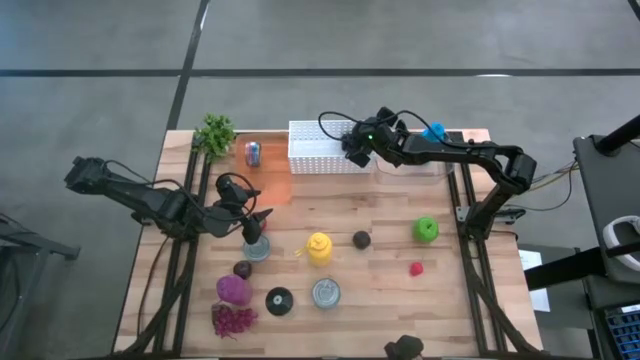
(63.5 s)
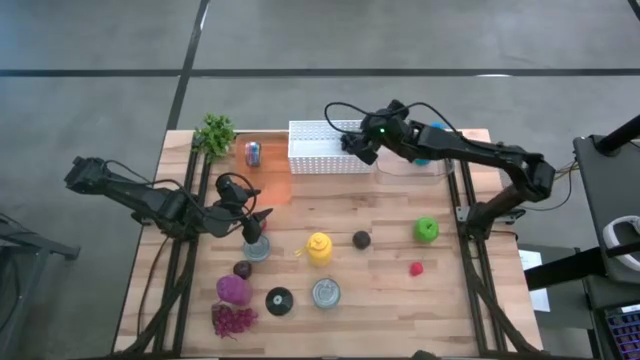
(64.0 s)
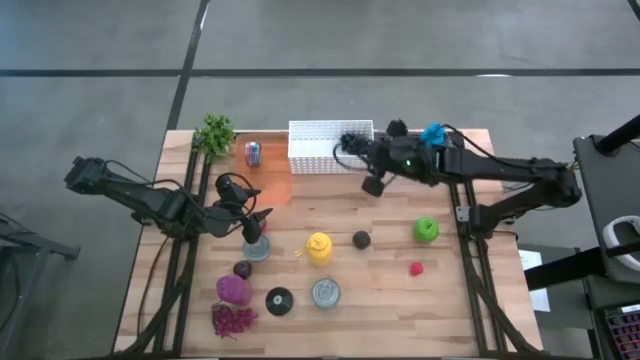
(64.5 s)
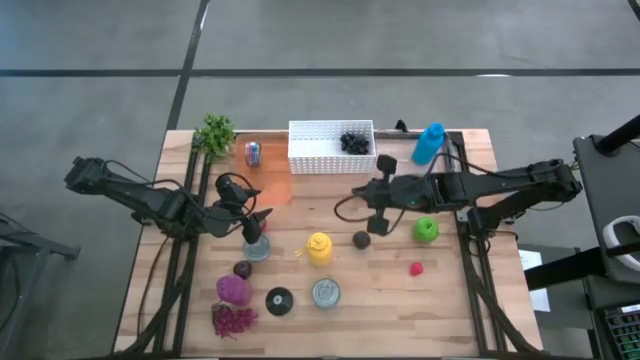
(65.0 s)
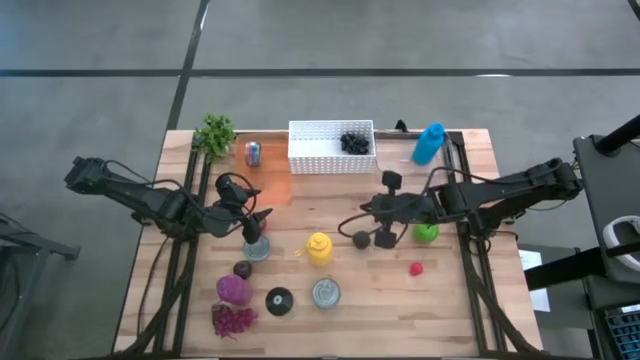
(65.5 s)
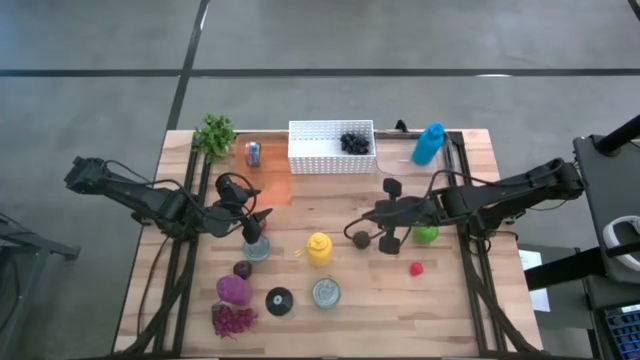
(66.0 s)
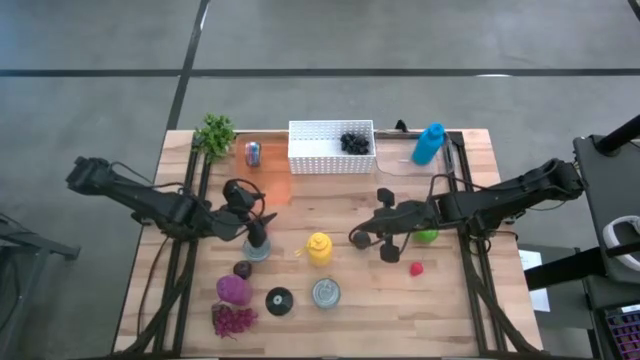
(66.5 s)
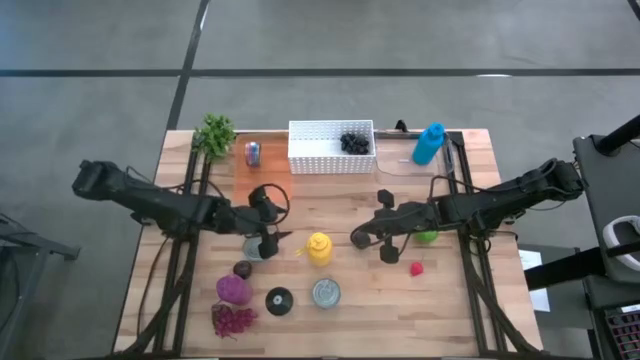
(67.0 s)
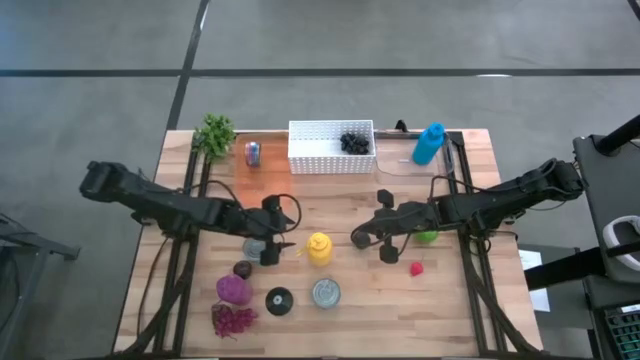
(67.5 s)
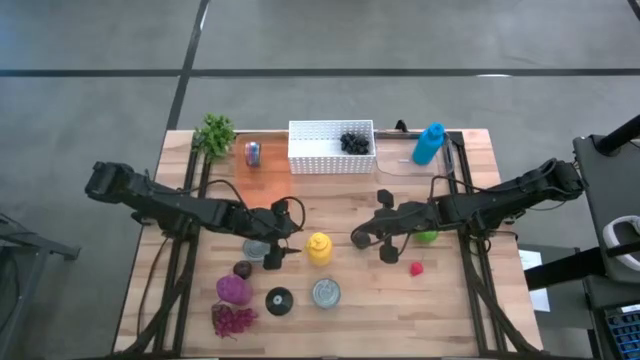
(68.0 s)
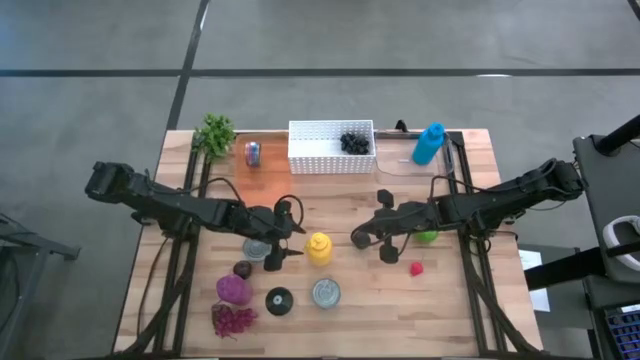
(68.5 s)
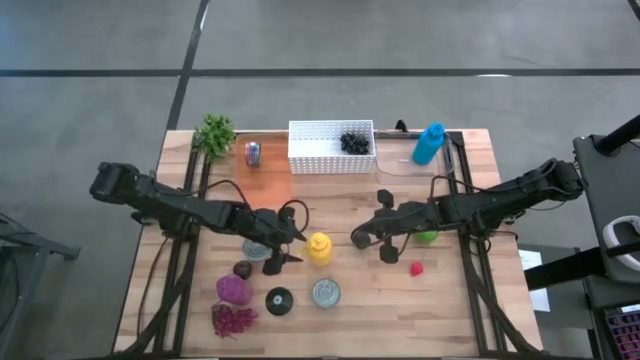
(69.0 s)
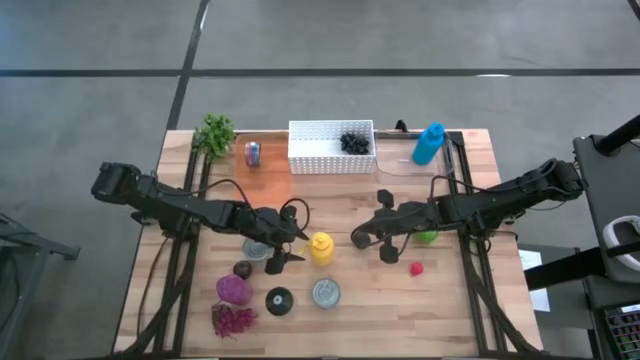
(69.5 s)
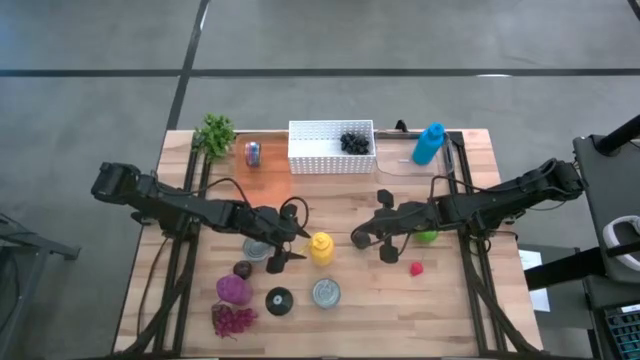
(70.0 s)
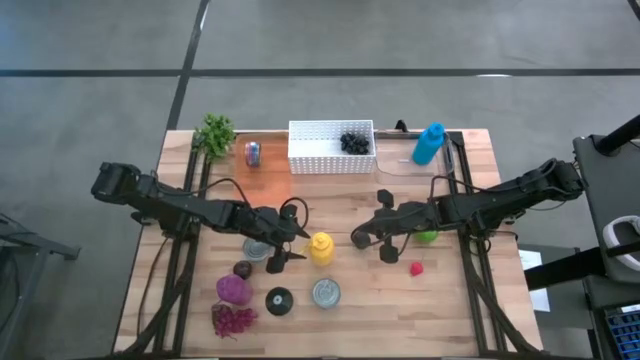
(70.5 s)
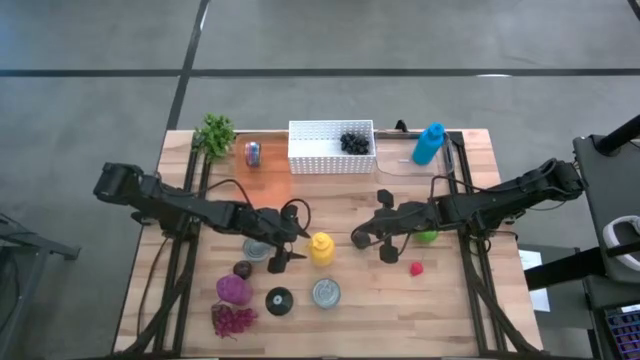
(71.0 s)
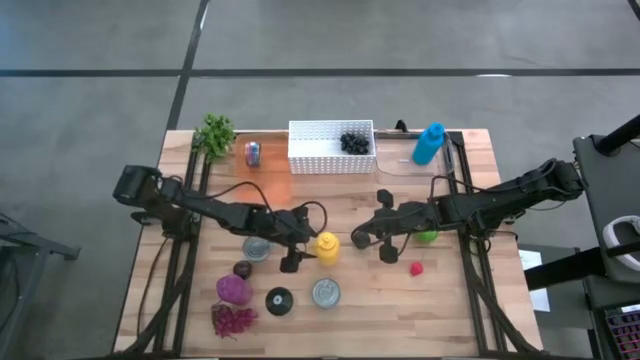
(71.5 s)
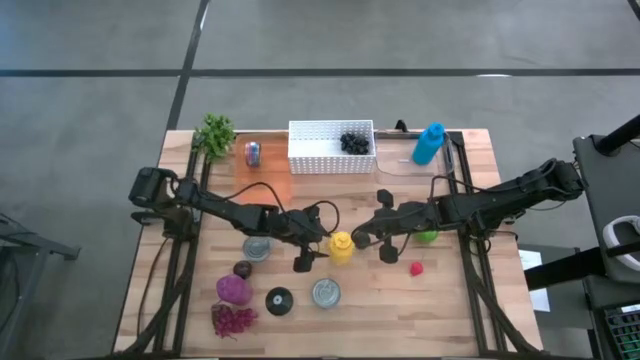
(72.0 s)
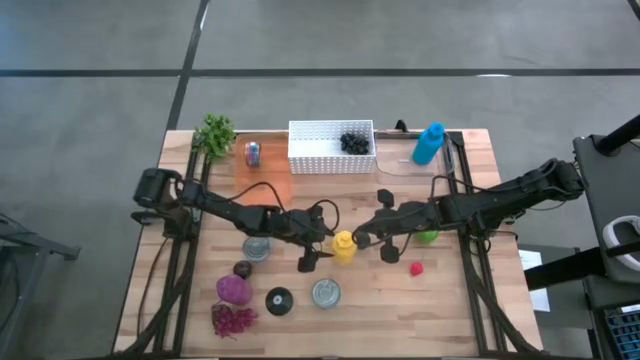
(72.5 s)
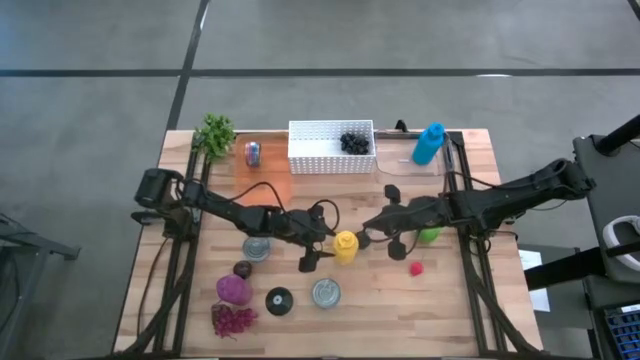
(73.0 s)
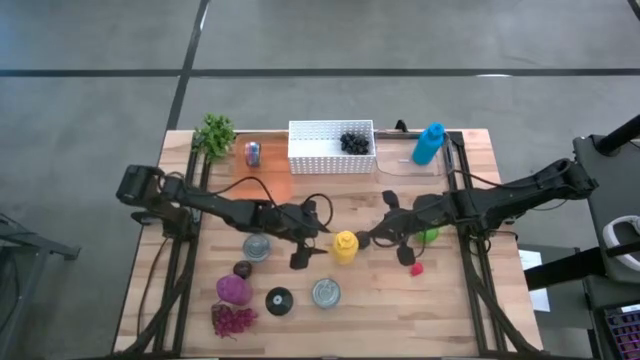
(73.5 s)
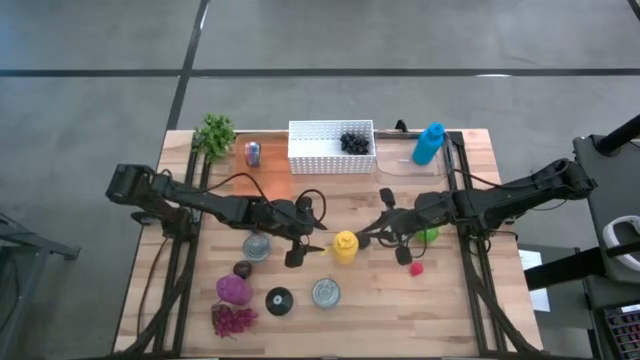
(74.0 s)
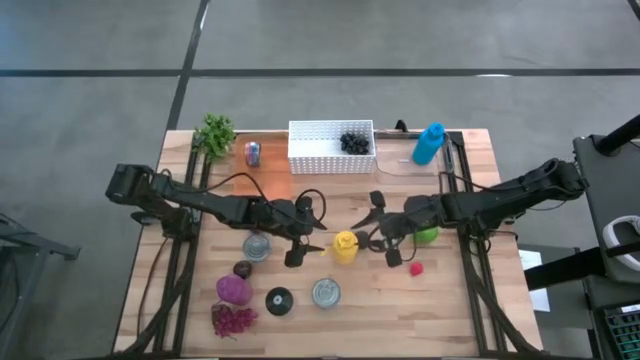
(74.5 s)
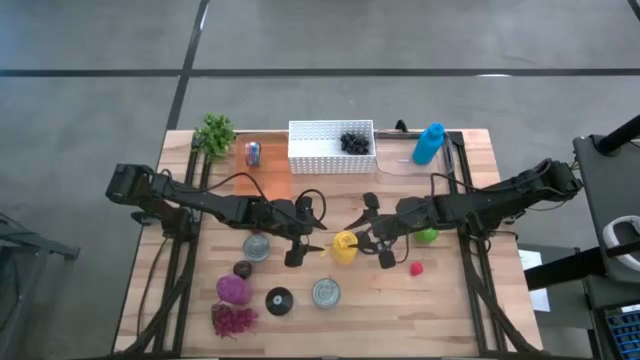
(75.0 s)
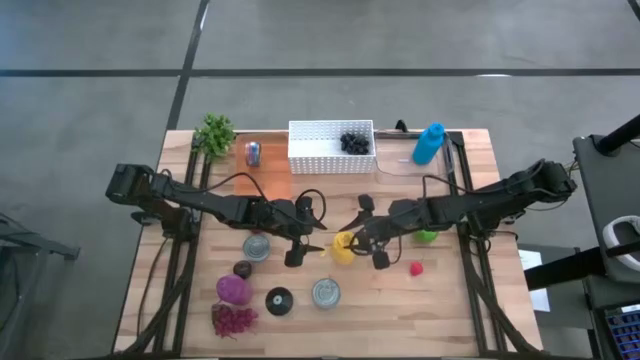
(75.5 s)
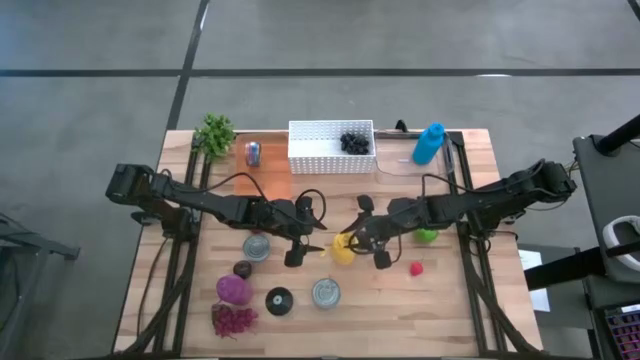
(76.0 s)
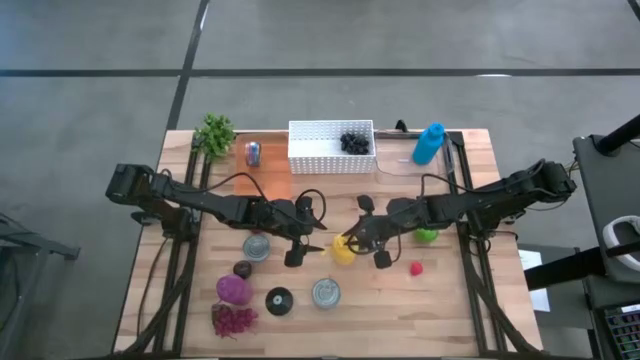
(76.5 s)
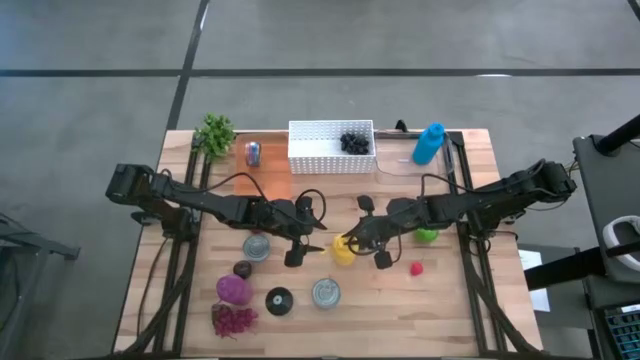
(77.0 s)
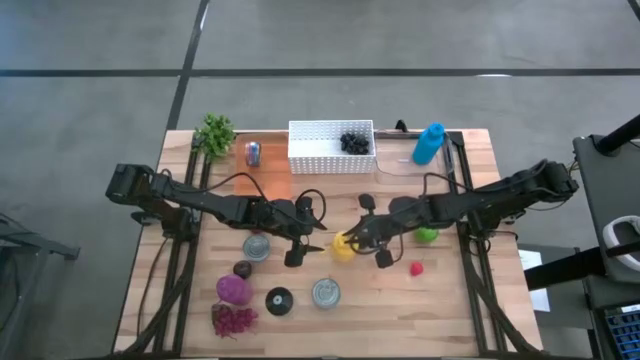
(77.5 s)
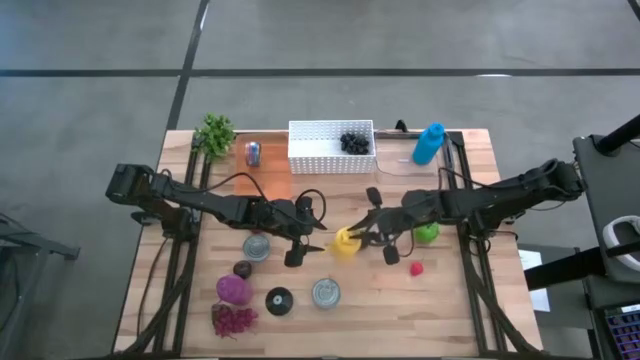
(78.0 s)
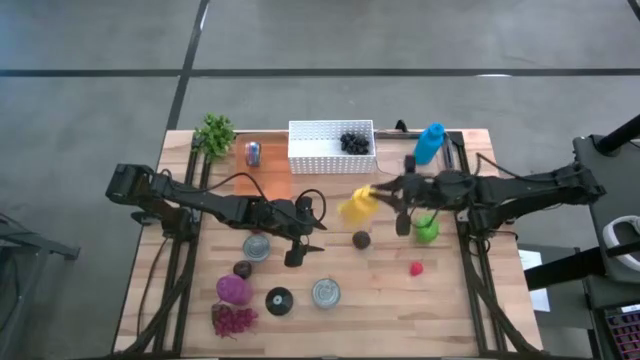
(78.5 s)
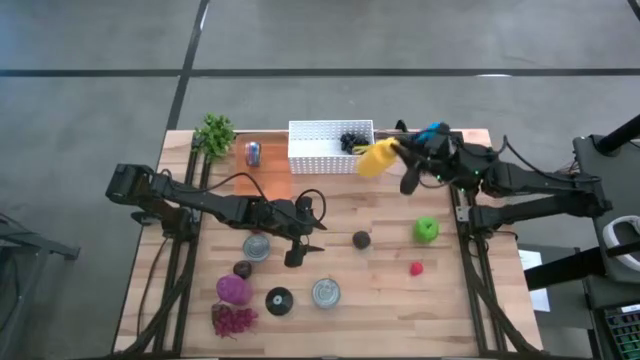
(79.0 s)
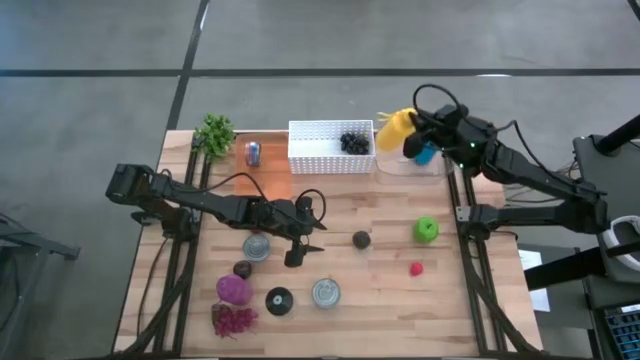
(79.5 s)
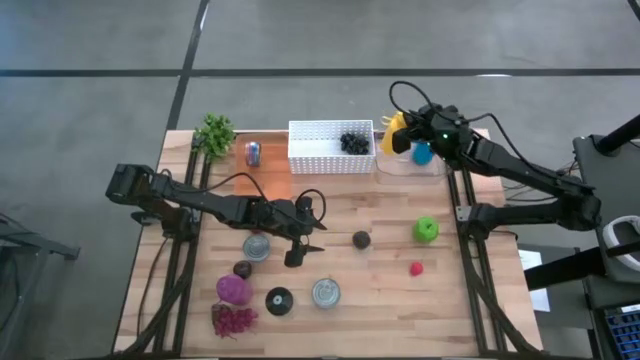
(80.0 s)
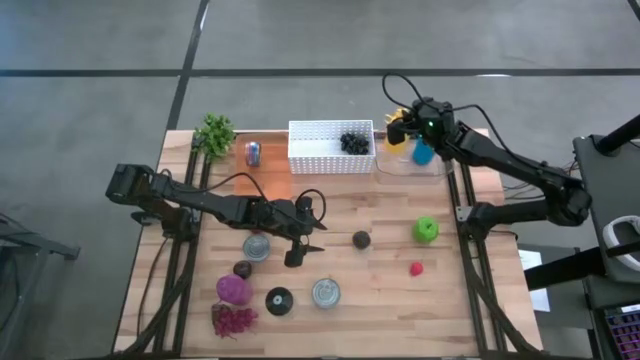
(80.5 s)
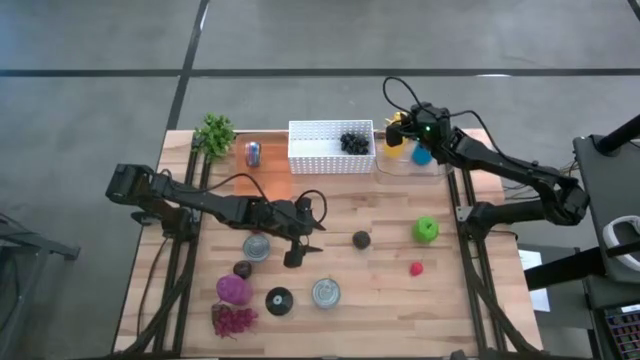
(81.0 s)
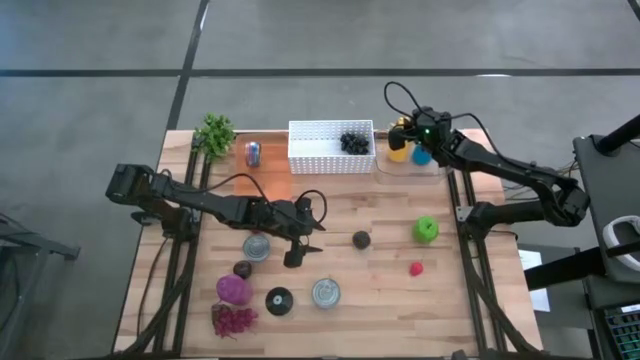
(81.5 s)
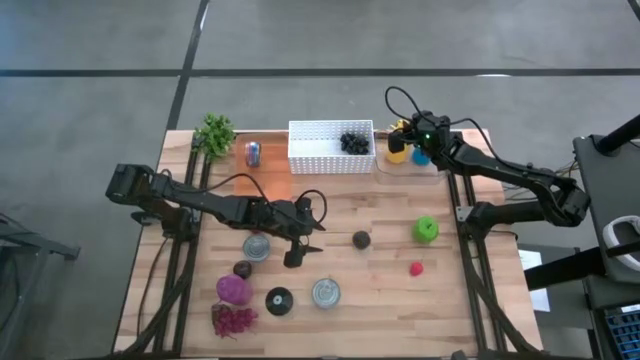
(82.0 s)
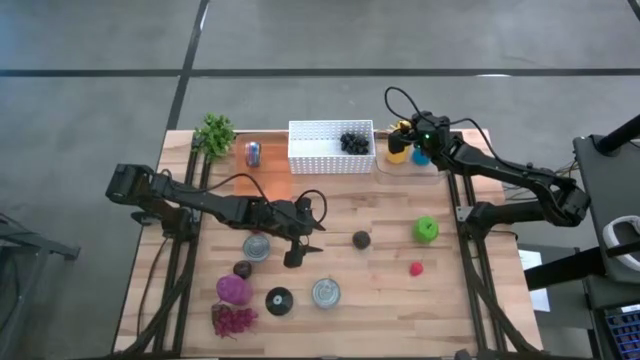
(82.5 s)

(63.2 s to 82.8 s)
Task: Pick & Place Food Item
Put the yellow water bottle into the transparent bin

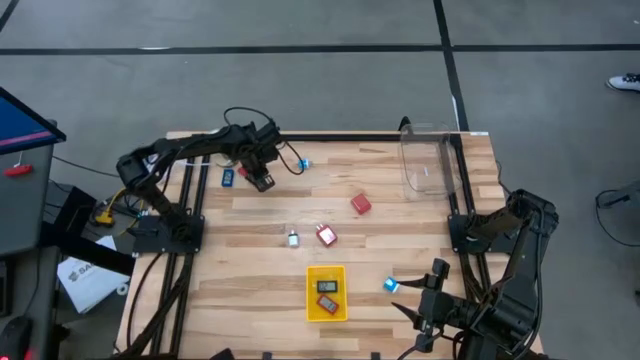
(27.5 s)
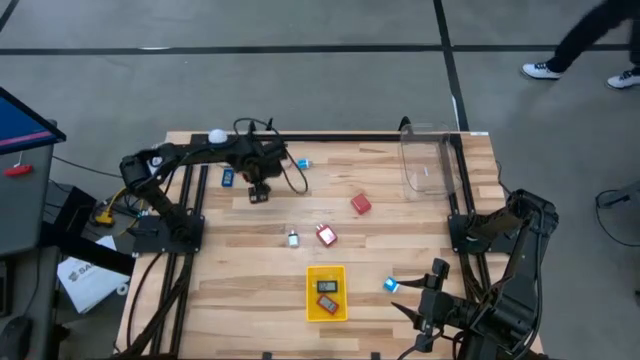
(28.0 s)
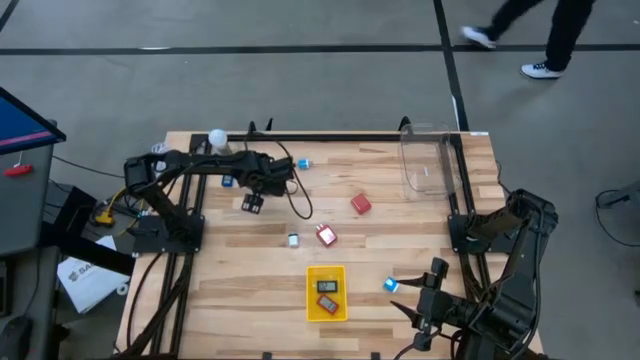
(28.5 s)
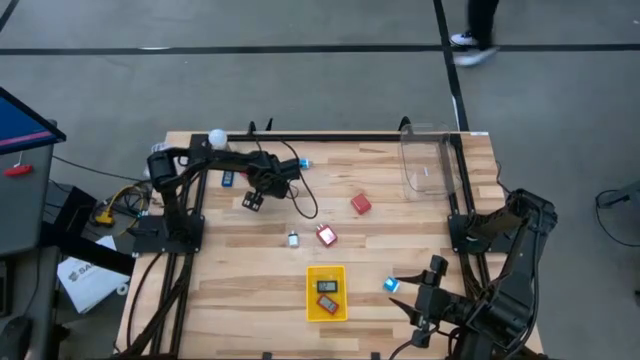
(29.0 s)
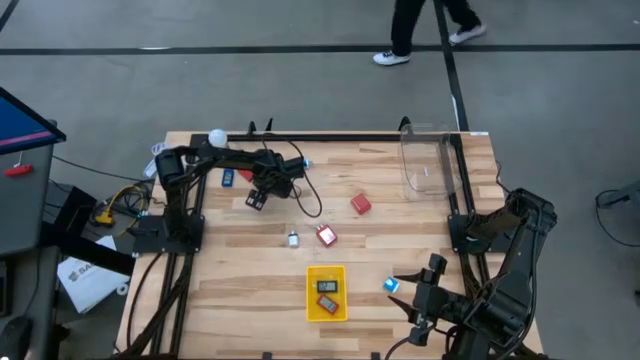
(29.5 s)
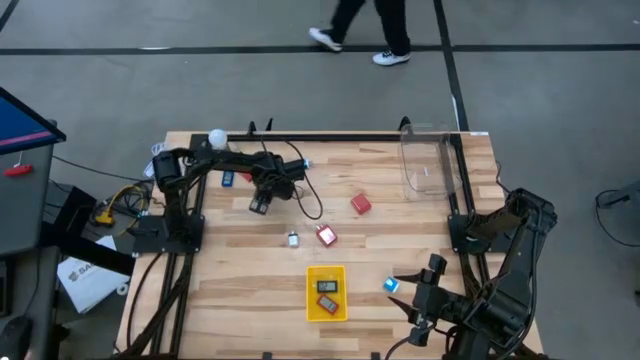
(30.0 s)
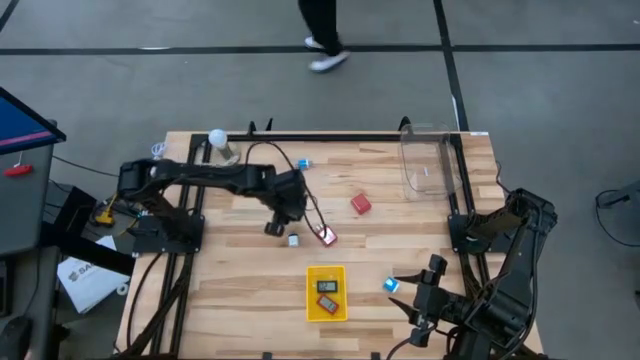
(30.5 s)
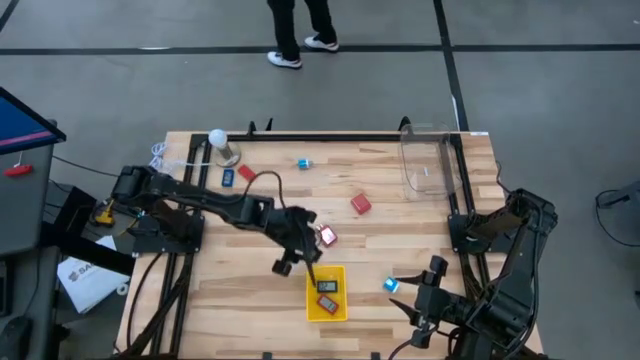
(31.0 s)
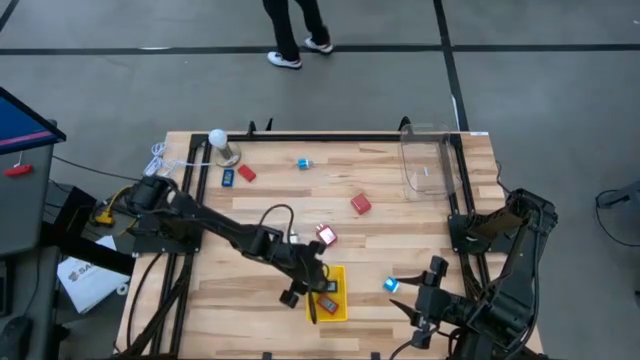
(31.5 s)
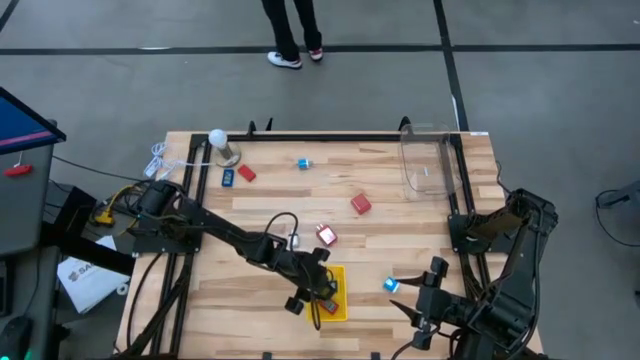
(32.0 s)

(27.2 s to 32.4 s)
Task: Pick & Place Office items
Put the black digital timer into the yellow bin
